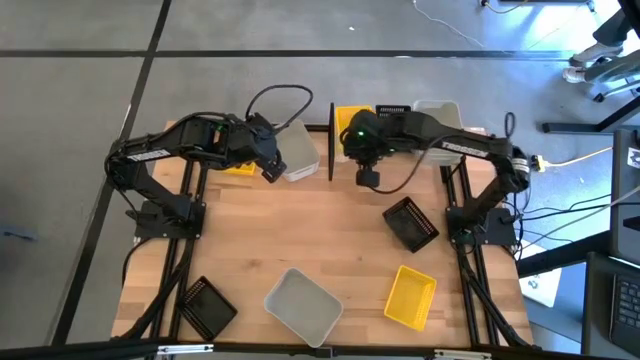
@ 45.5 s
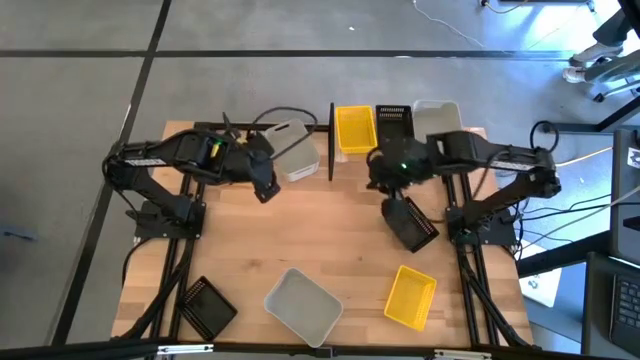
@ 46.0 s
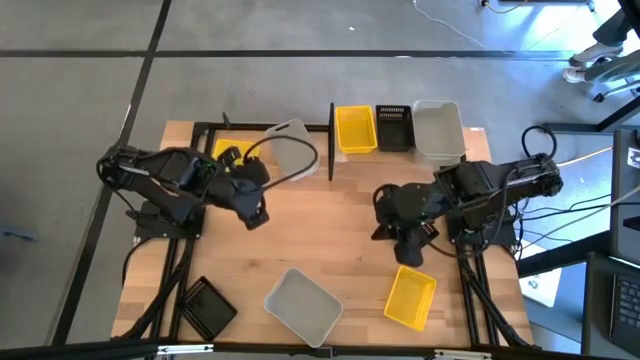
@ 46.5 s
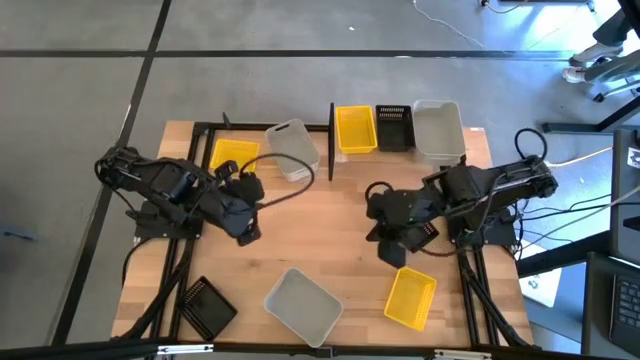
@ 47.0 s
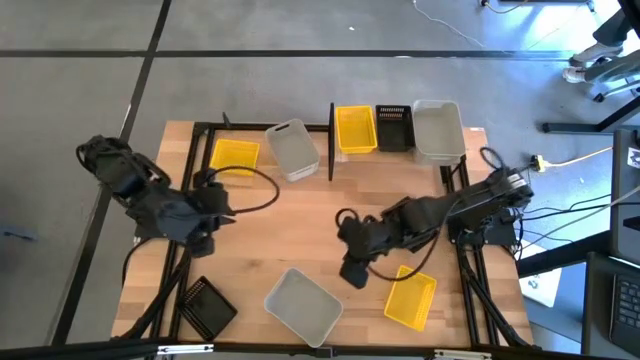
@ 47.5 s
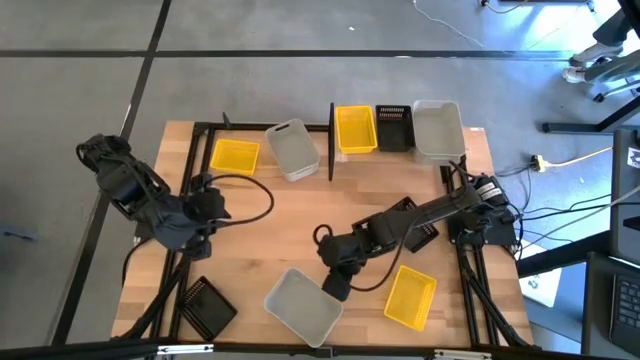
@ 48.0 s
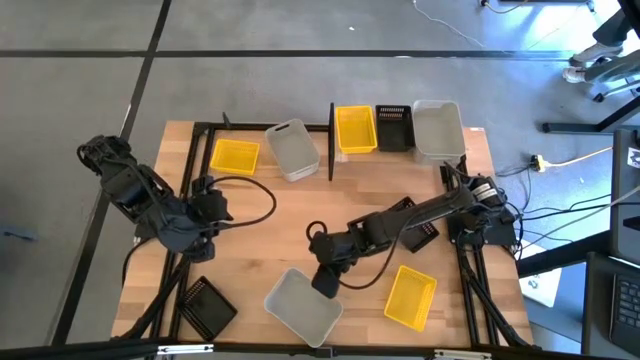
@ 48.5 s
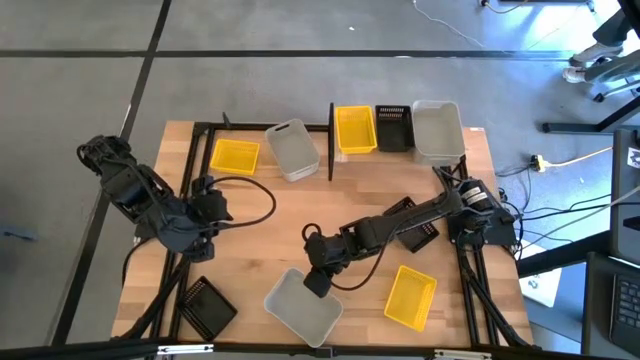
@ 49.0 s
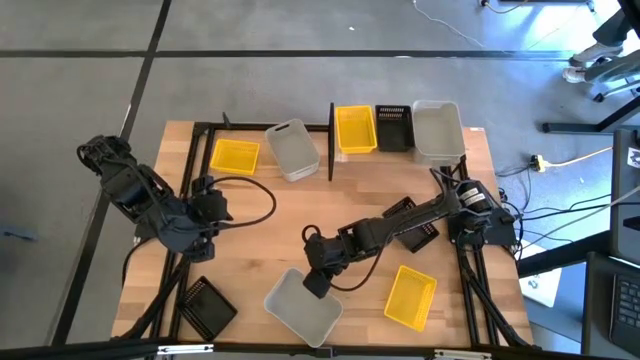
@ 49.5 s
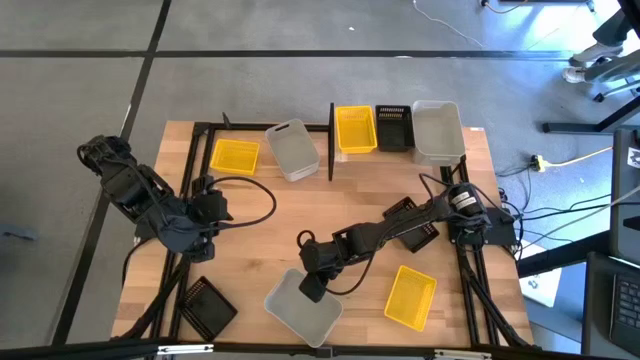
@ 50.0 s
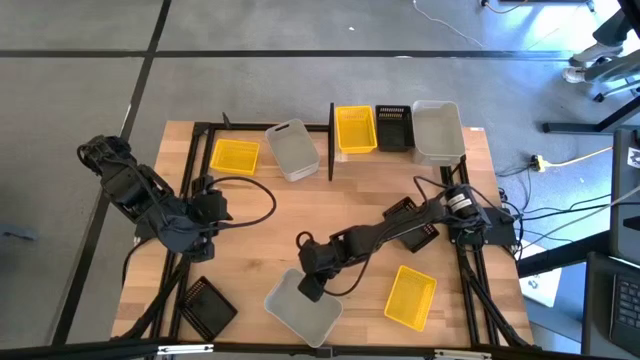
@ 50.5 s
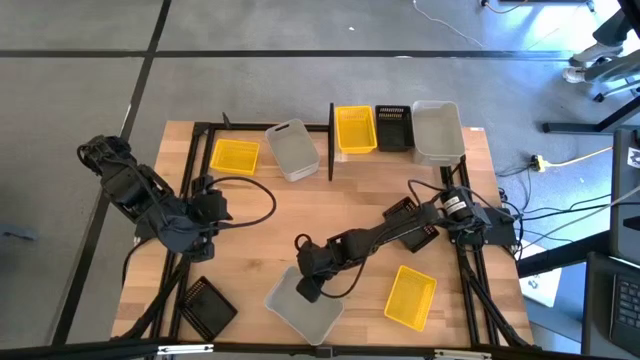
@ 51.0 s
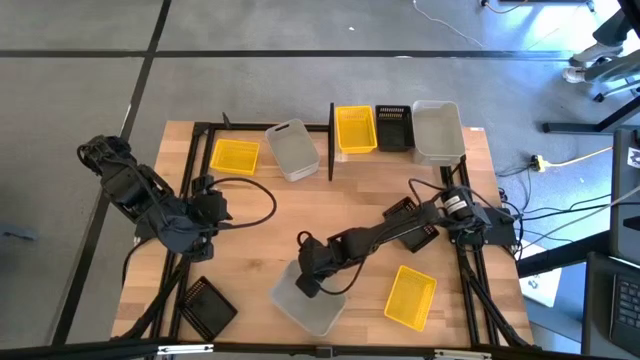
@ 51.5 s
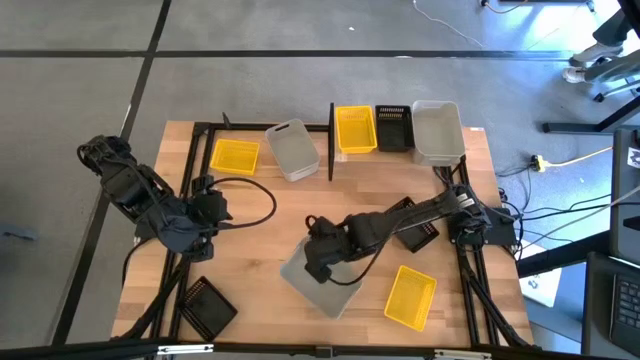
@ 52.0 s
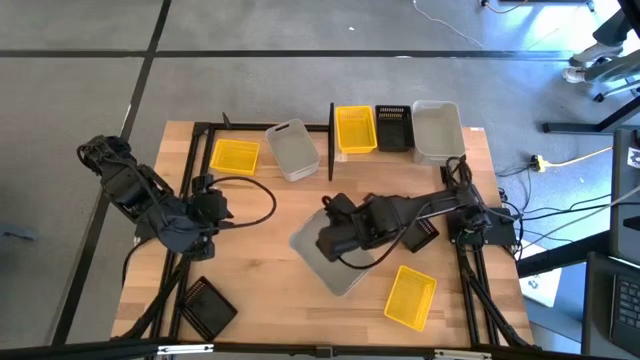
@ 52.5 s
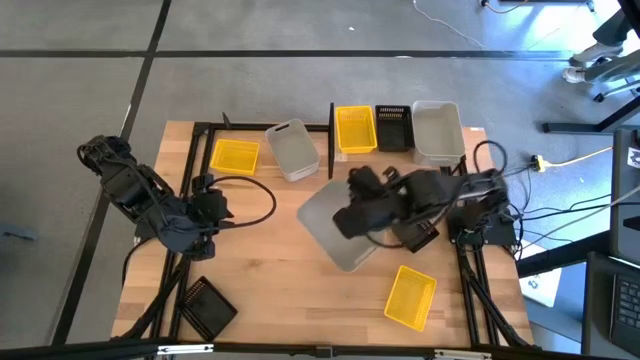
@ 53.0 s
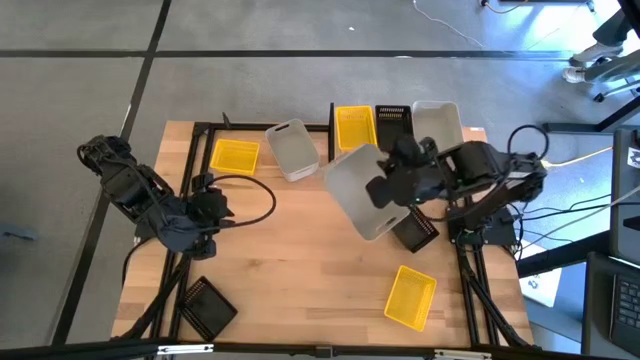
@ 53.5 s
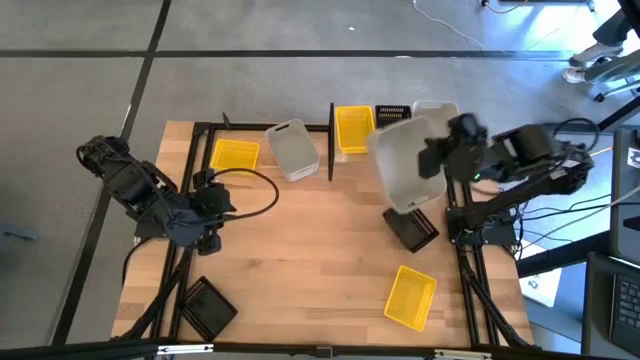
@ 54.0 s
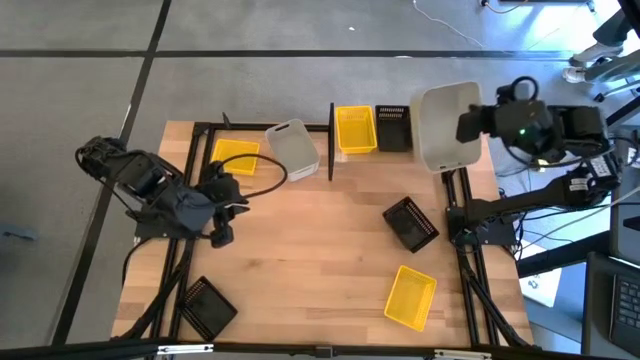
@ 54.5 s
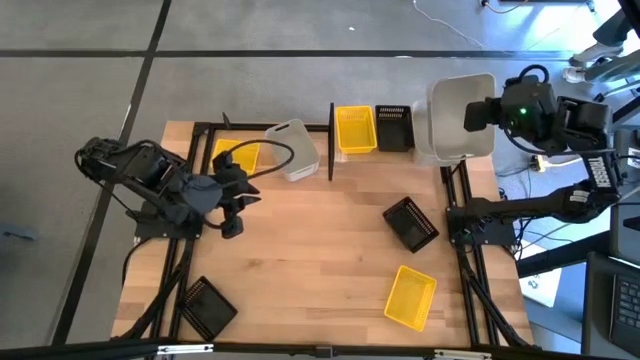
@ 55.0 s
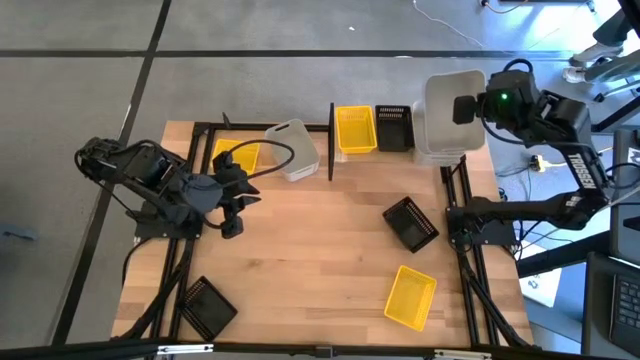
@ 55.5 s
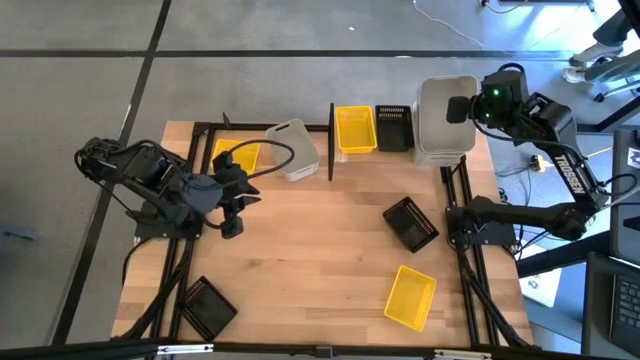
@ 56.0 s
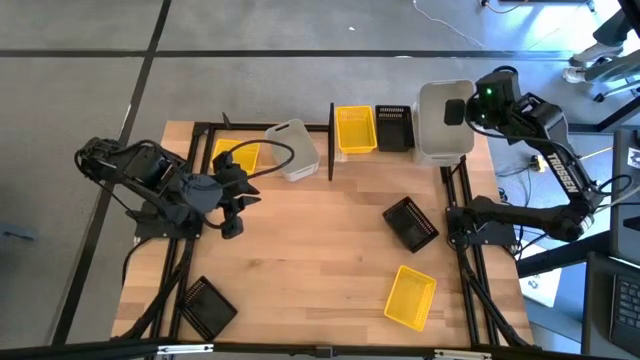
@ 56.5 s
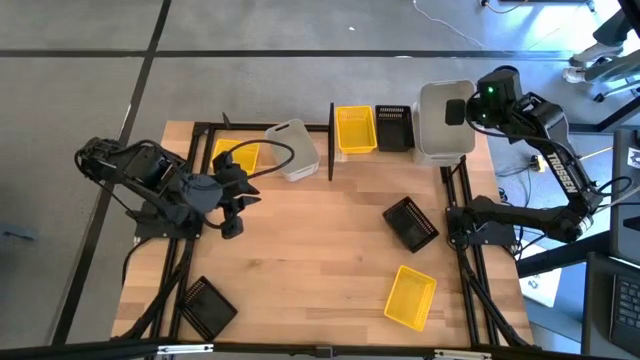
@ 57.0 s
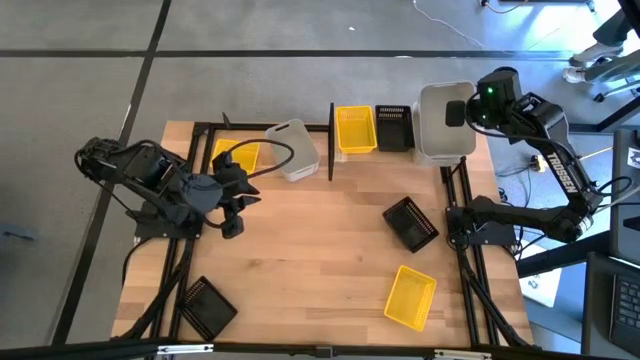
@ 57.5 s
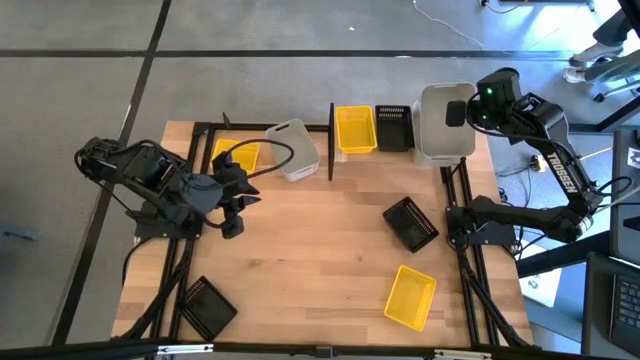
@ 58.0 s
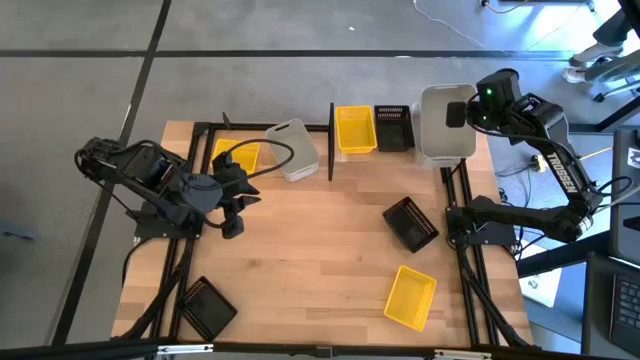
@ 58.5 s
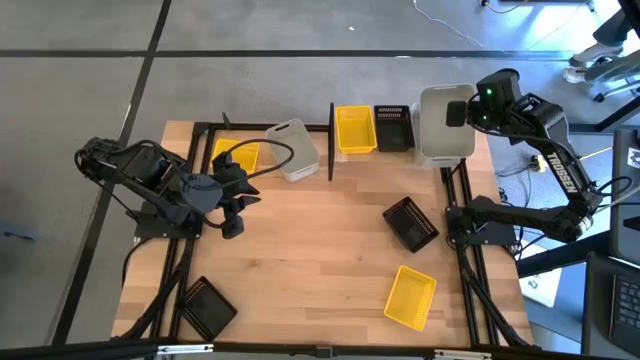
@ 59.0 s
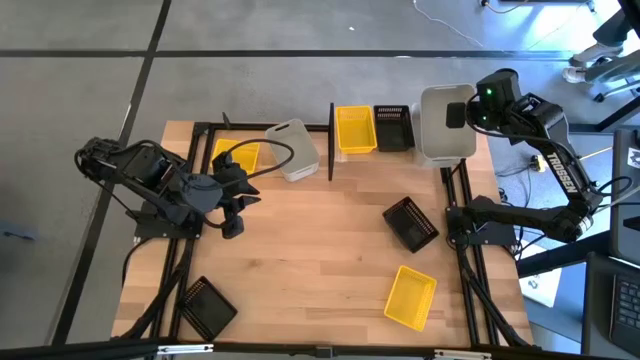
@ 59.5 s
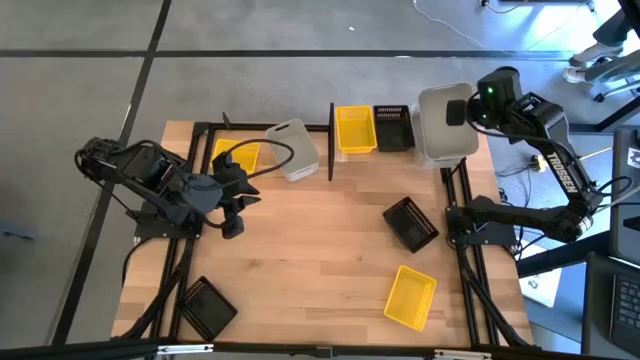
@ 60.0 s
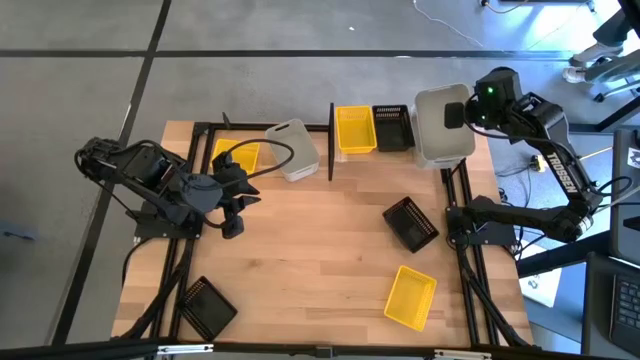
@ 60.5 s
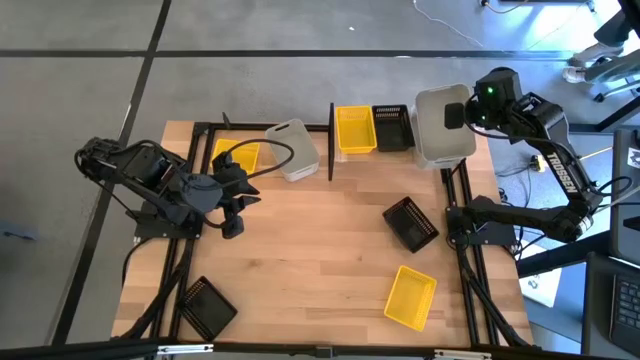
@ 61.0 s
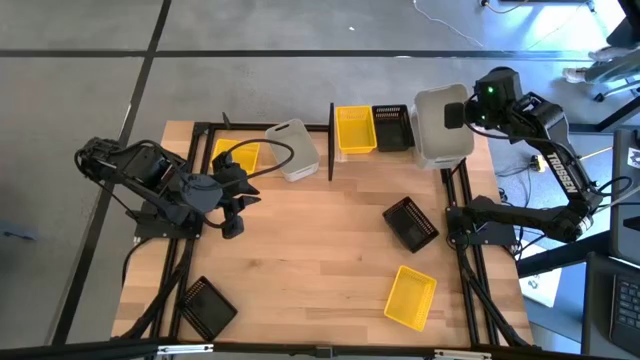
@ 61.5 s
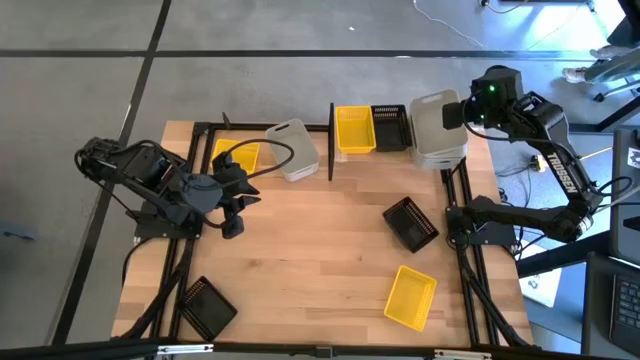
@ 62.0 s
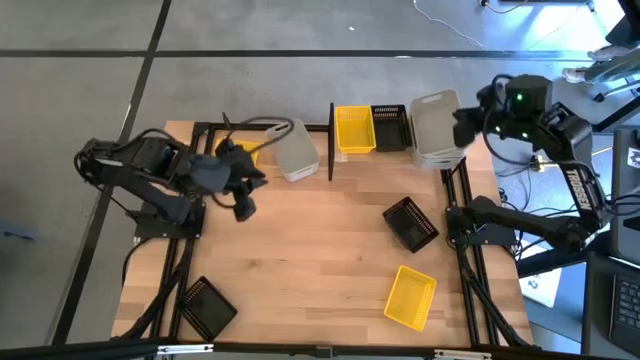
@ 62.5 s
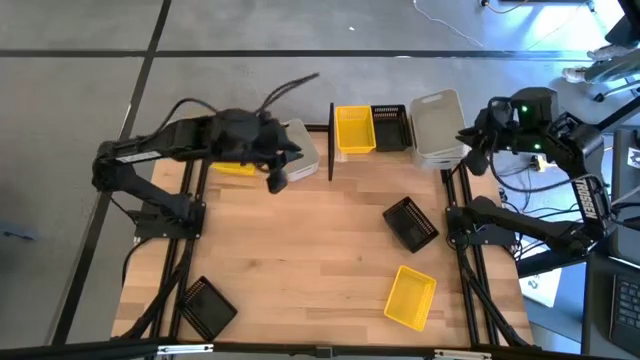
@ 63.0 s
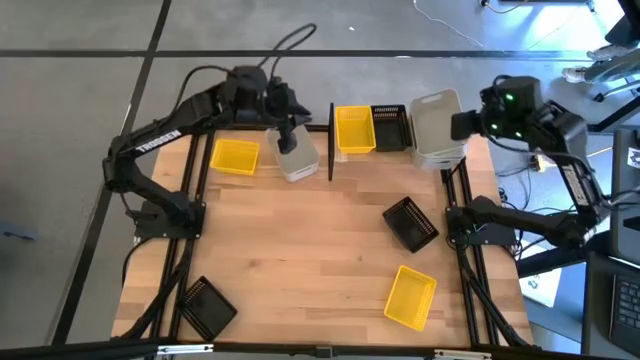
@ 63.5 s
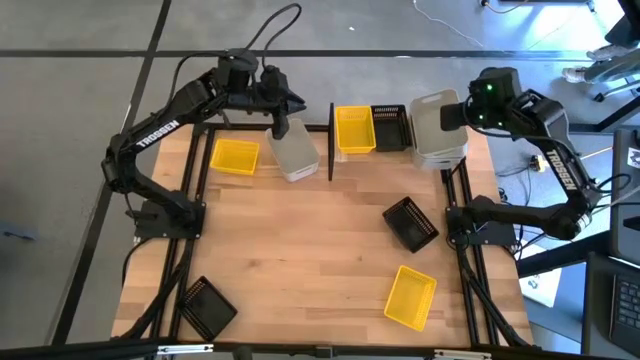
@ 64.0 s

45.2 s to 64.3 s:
Task: Stack baskets on shelf by color
Stack the bottom white bin on top of the white bin on the shelf

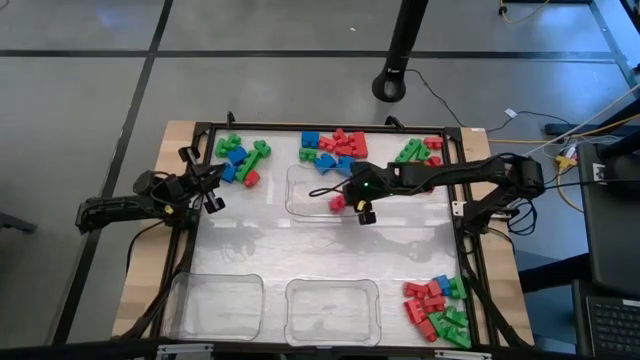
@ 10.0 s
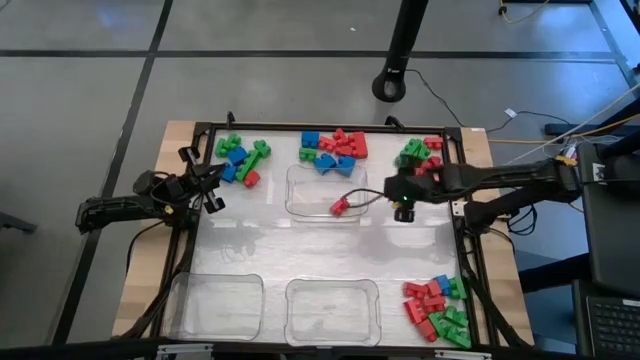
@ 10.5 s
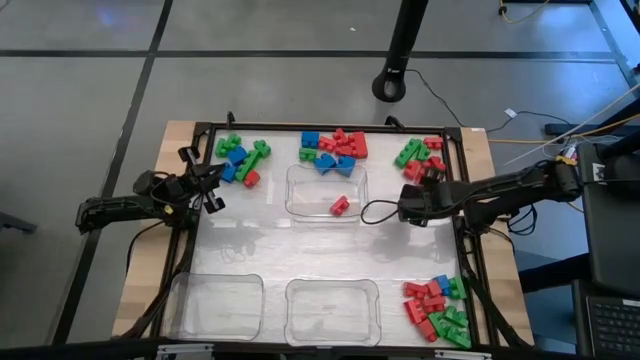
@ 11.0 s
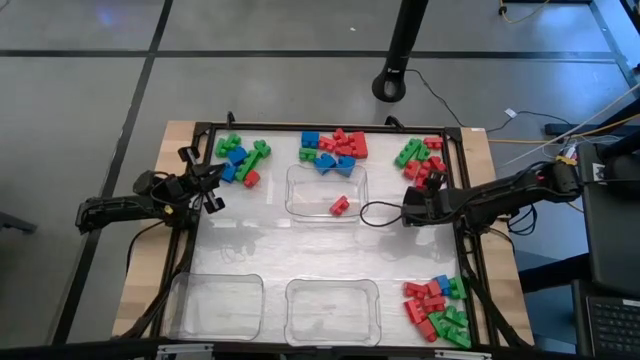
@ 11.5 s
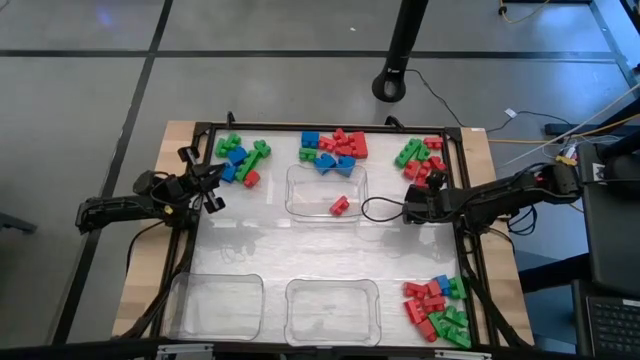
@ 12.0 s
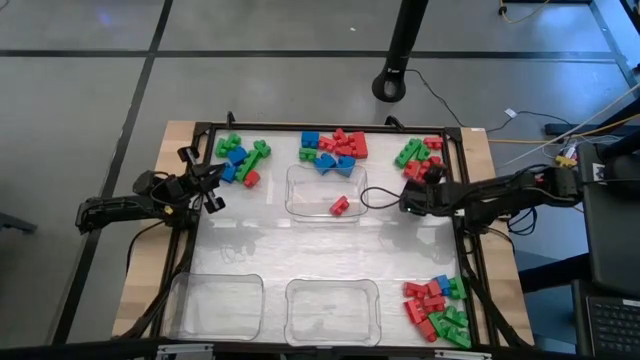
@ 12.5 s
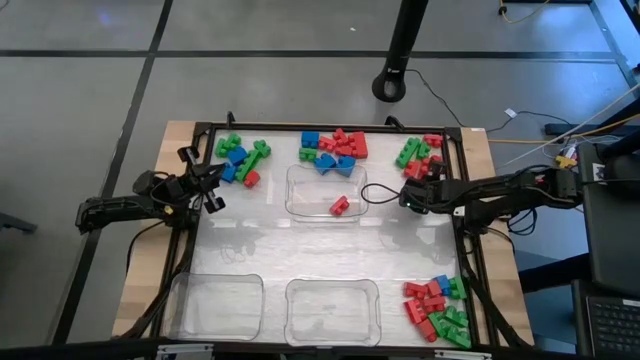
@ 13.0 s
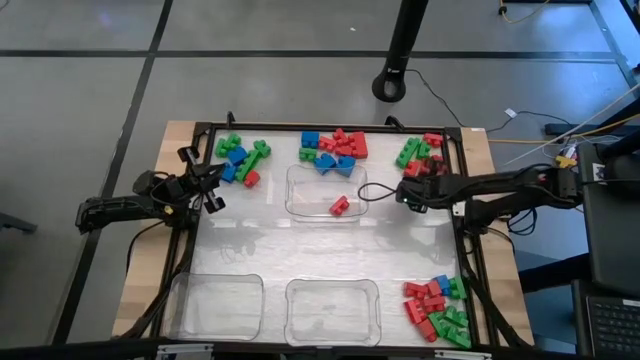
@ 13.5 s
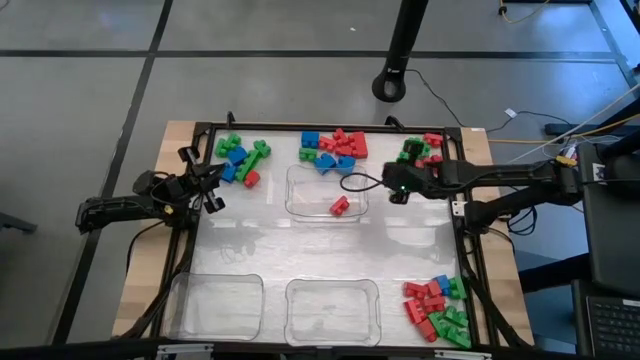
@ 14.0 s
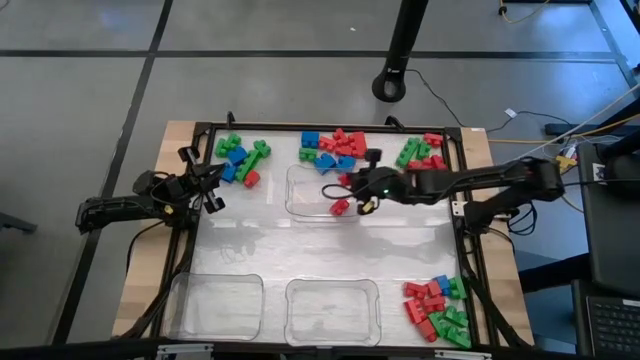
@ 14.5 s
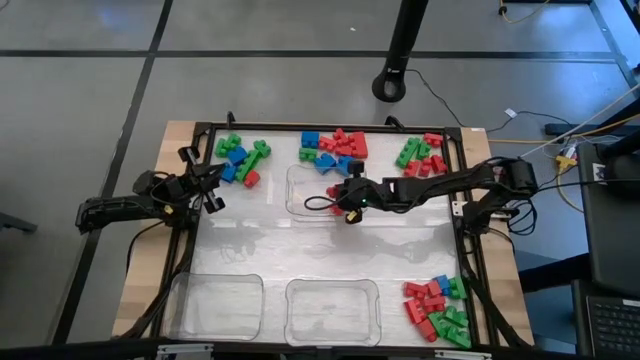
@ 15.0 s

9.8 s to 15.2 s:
Task: Sort blocks
Put the red game piece into the top right transparent bin
